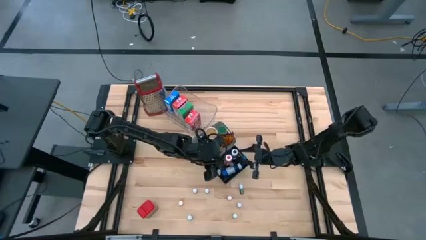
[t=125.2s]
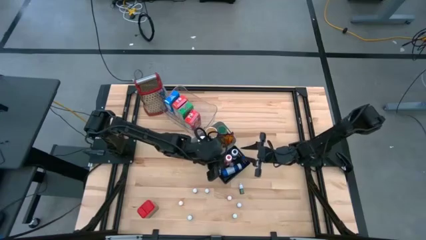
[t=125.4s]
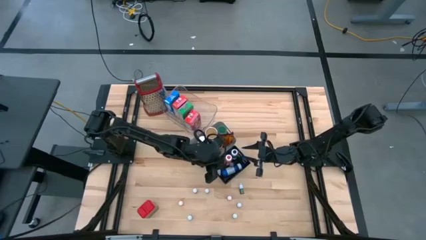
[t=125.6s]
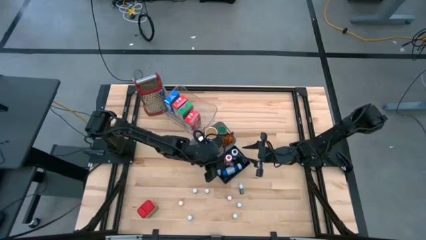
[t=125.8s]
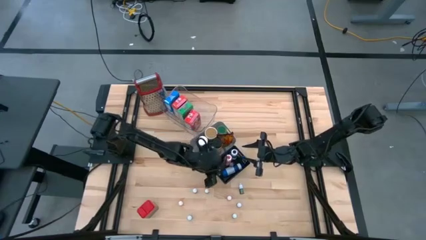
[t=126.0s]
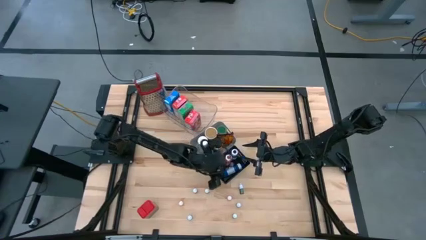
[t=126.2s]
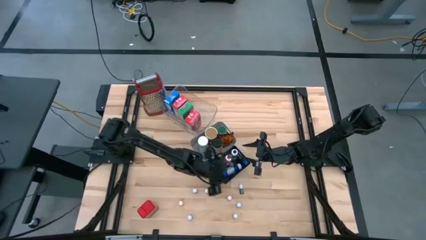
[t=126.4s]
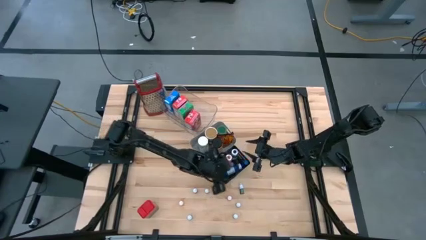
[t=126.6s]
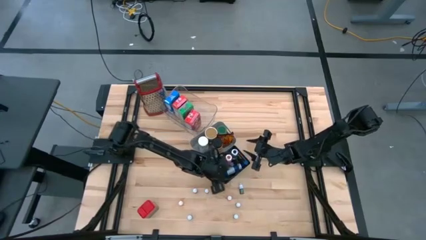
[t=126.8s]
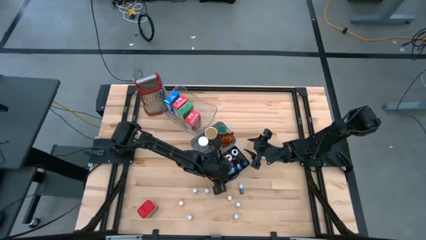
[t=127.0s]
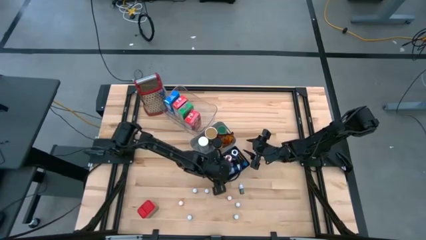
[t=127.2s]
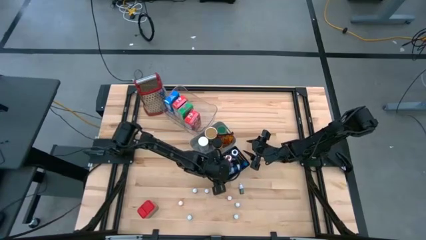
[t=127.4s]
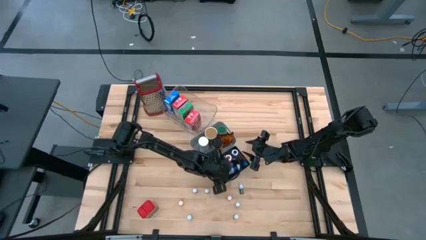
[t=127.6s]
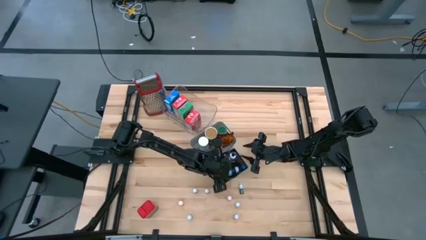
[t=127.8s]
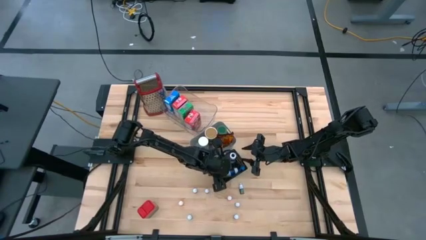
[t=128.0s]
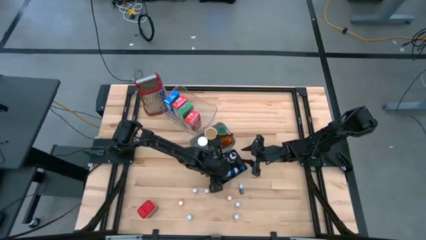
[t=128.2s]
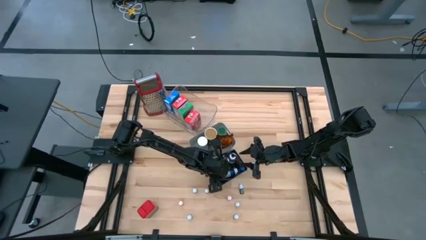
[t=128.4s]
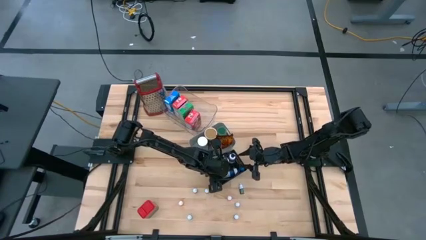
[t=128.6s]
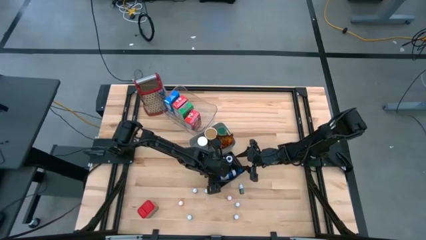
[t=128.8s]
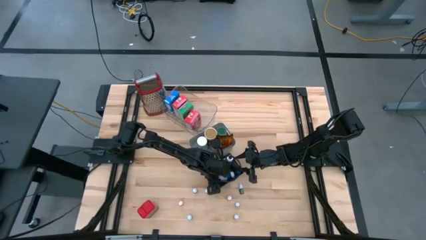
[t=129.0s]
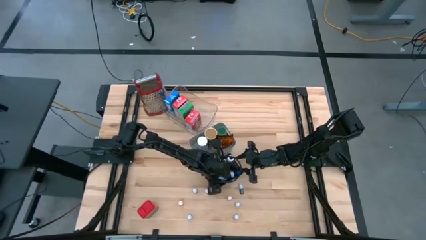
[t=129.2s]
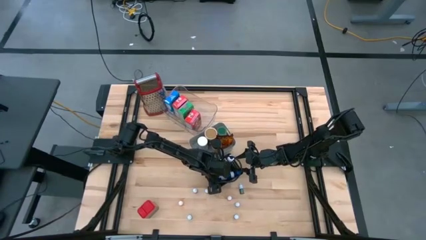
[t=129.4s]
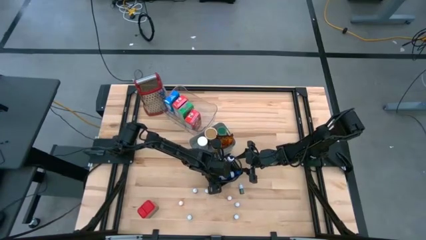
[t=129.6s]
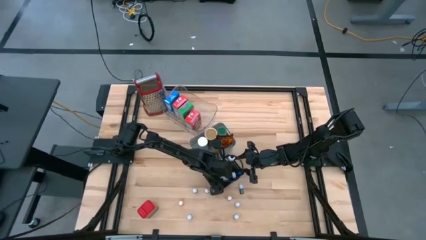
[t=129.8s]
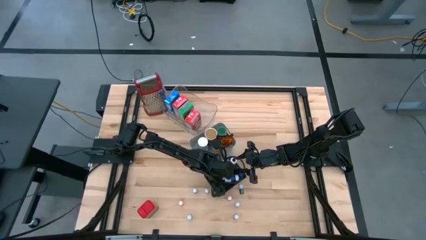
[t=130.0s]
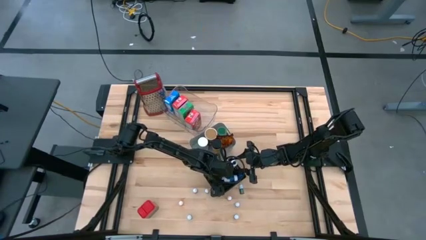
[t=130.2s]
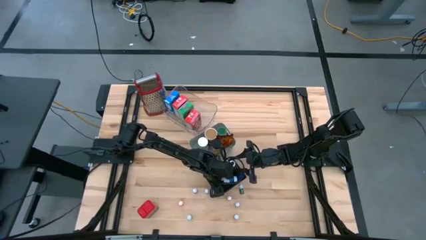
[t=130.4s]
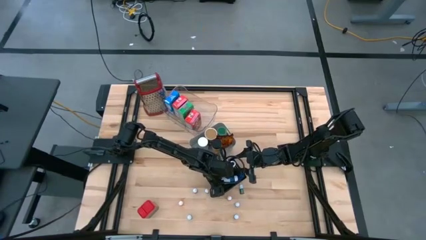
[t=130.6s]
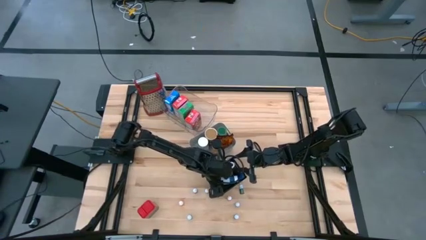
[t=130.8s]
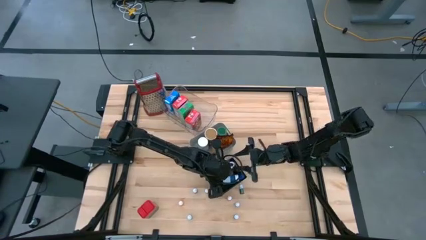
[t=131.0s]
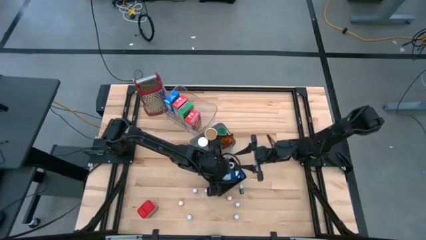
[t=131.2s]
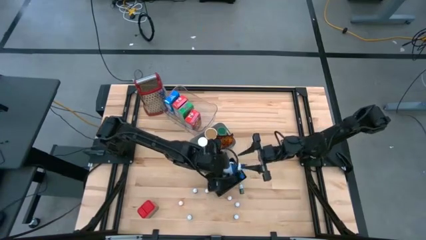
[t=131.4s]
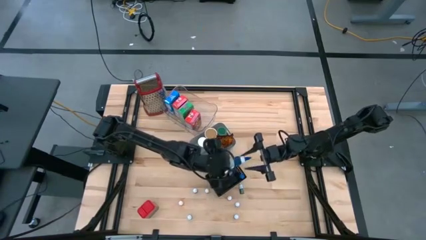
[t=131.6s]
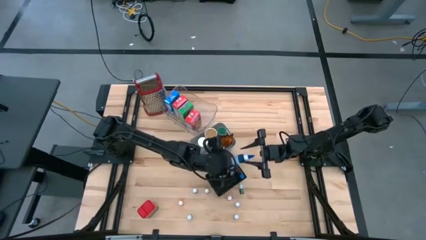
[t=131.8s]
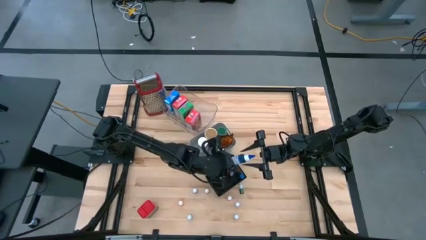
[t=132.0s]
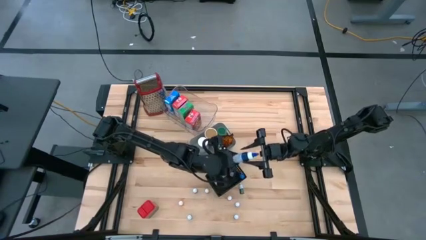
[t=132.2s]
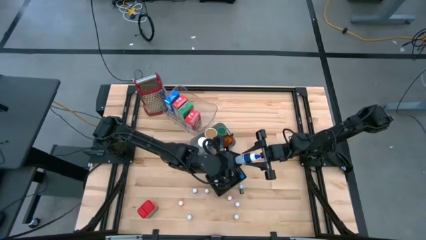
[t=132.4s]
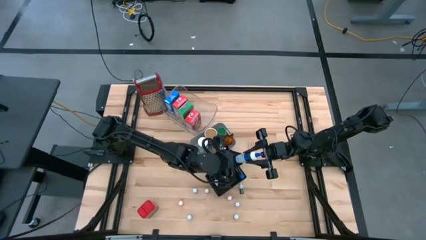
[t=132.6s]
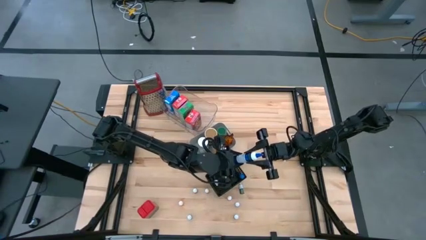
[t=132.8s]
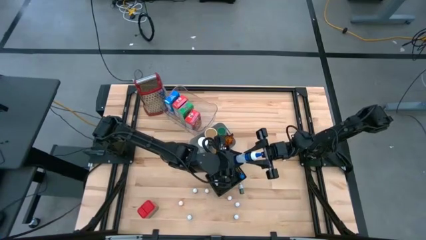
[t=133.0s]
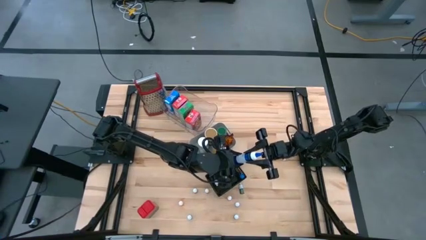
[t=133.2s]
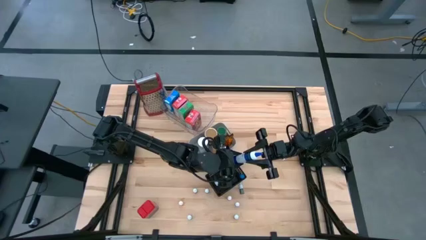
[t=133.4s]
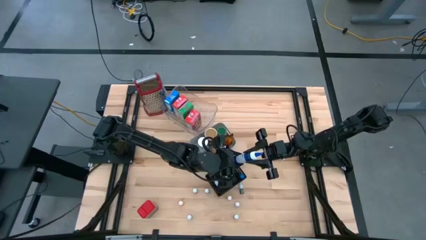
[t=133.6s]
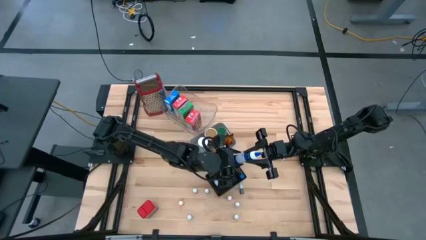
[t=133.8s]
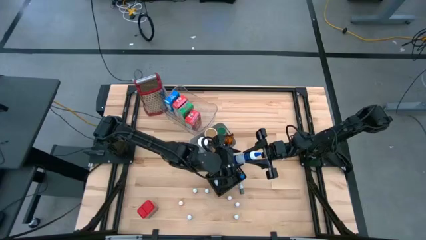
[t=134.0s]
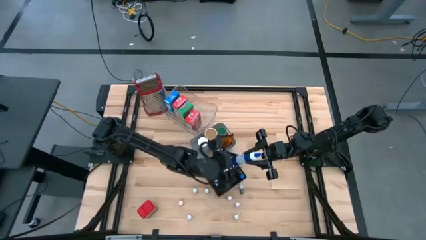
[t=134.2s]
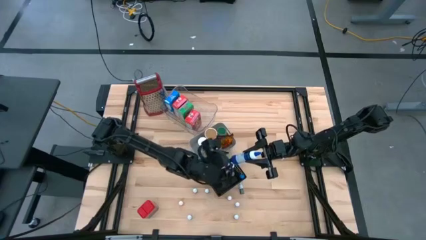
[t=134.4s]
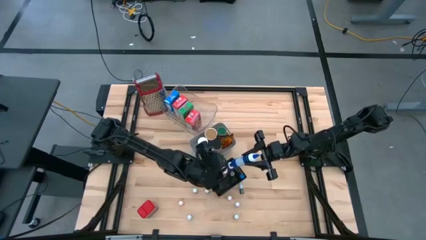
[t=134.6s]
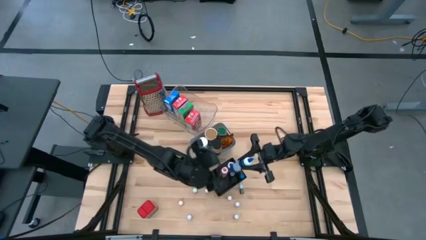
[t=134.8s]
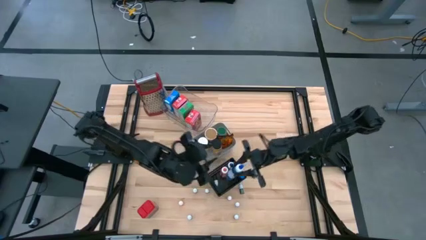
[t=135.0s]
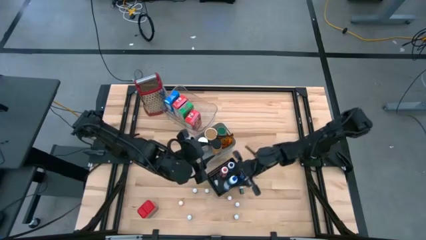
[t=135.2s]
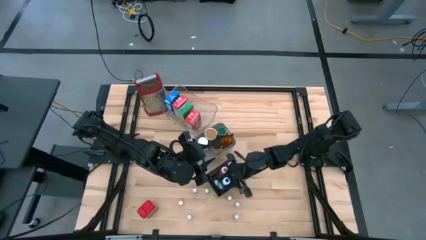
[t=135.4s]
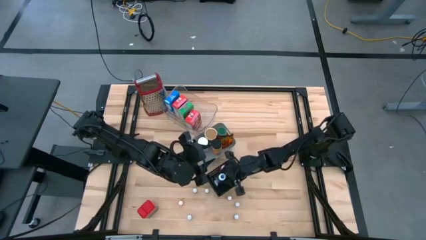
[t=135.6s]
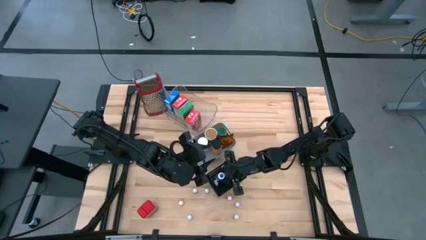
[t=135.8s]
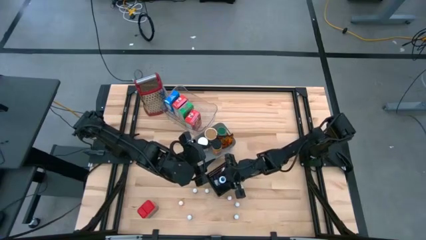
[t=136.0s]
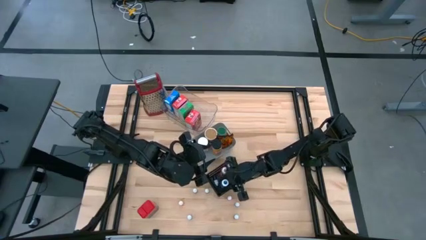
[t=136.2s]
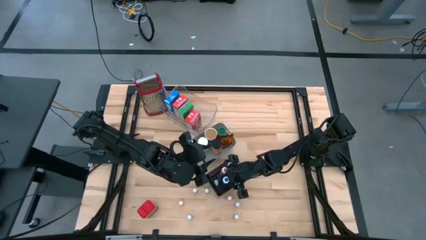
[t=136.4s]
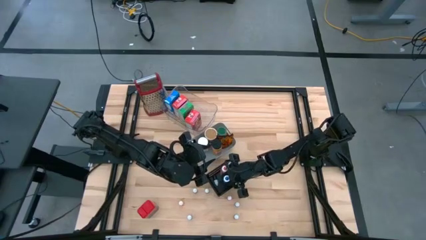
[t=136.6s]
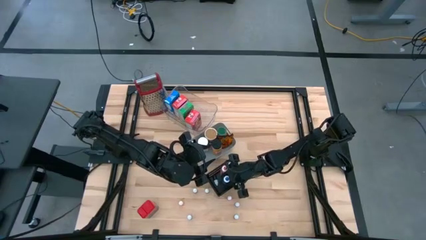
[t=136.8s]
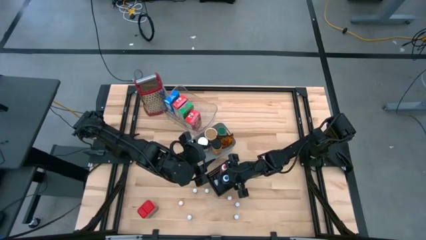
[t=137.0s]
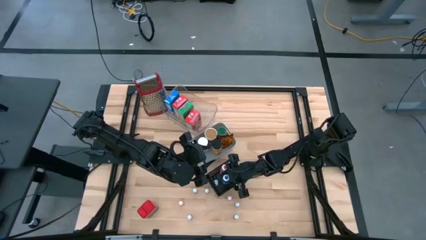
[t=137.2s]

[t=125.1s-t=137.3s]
Task: Pick & Place Kitchen Items
Adjust the blue food coloring bottle on the black bin

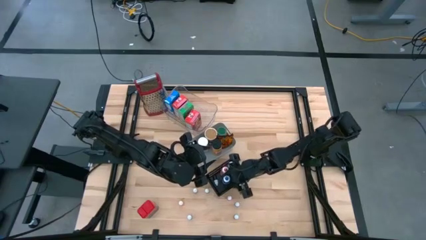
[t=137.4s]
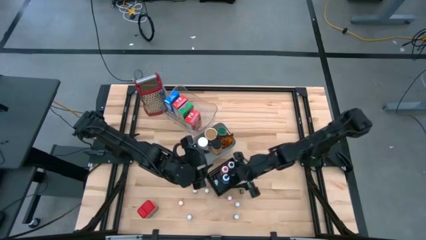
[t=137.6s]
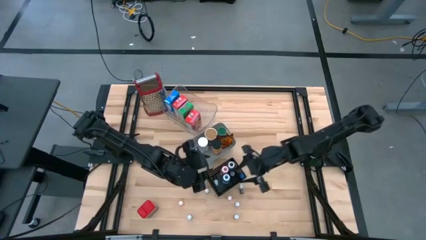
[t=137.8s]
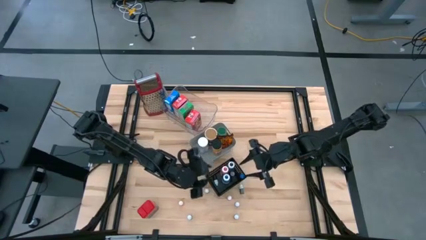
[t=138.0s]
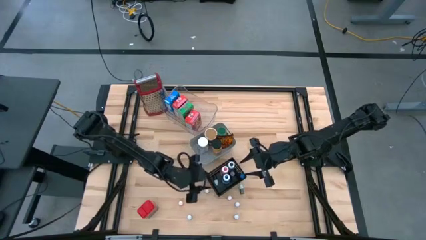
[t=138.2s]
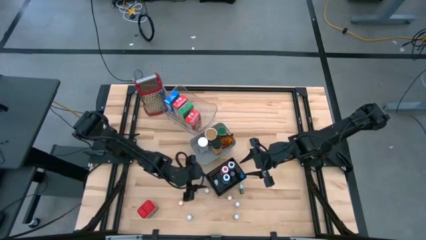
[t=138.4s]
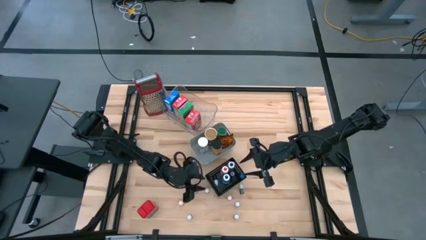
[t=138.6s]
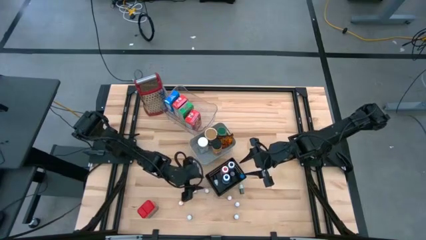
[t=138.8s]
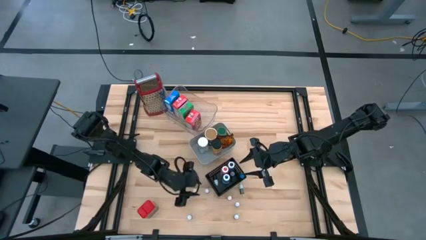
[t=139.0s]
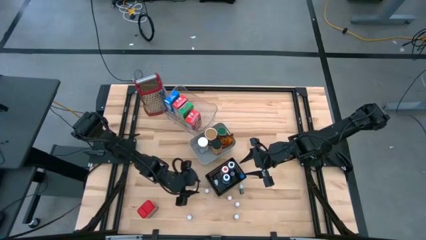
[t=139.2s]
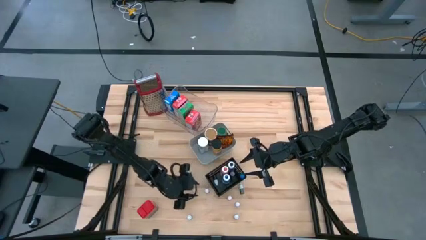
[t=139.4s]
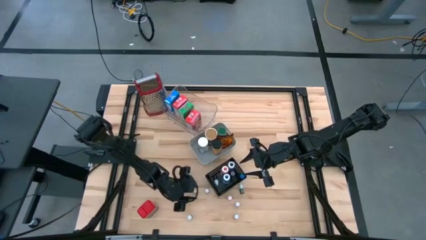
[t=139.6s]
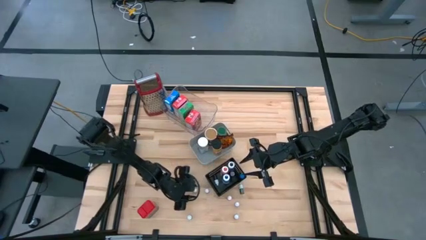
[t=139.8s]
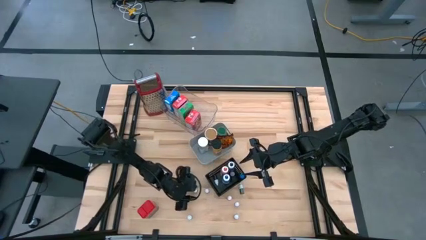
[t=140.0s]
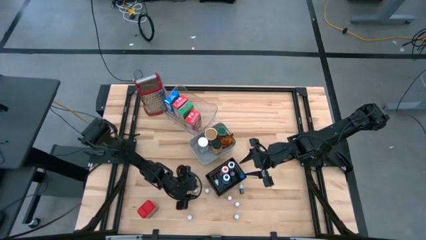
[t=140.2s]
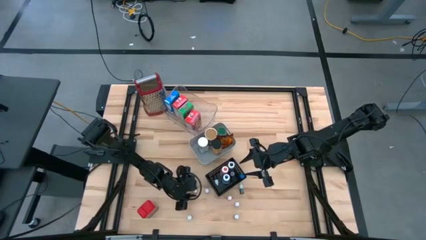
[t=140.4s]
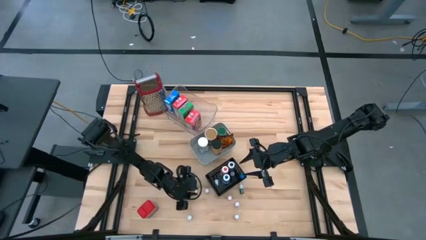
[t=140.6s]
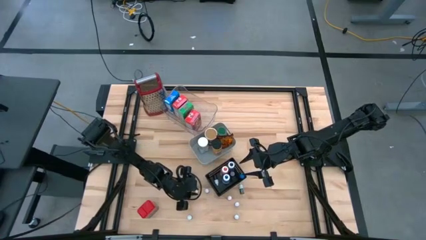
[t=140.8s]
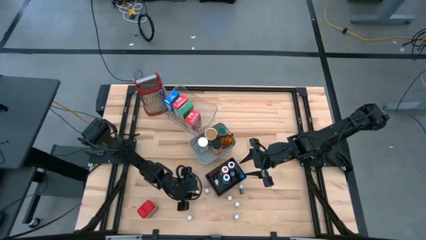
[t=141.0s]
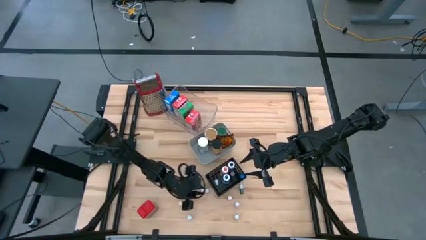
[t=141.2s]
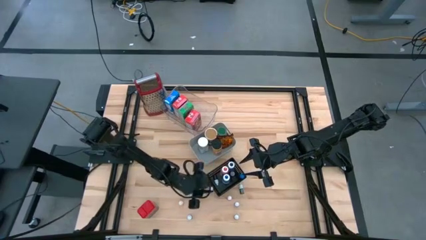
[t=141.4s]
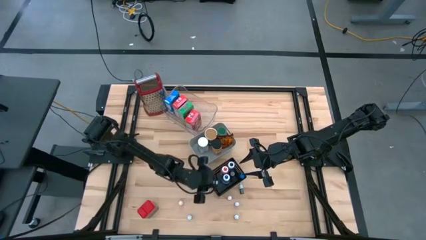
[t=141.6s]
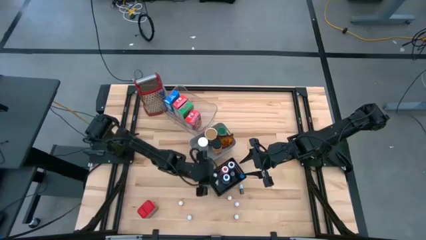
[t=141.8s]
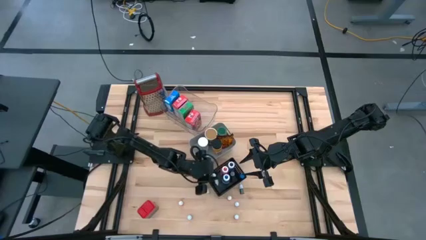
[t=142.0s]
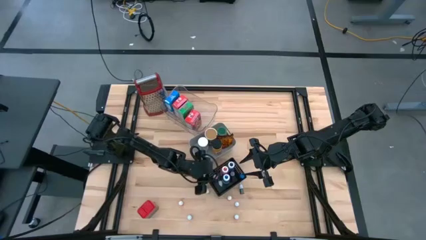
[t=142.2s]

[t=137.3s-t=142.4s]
Put the black small food coloring bottle into the black bin
